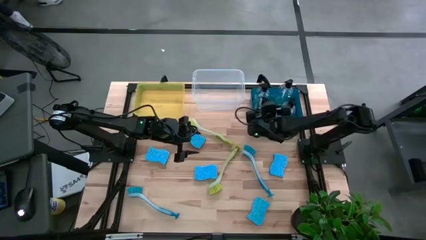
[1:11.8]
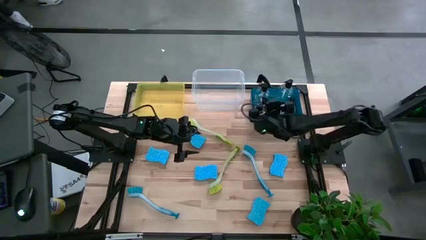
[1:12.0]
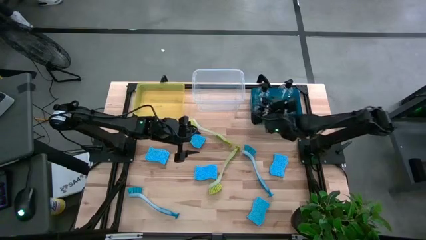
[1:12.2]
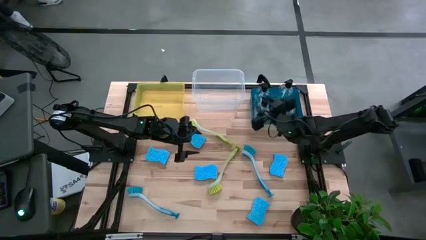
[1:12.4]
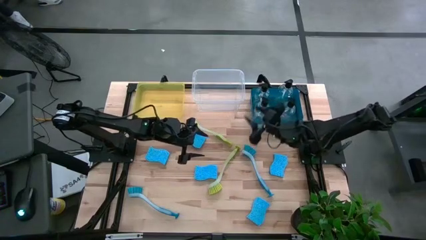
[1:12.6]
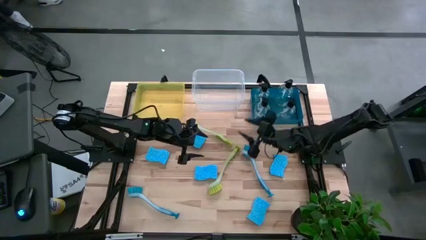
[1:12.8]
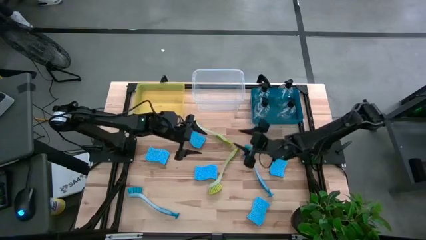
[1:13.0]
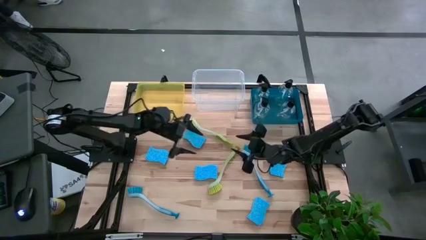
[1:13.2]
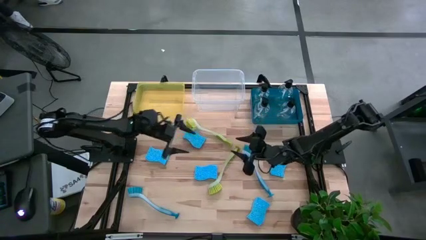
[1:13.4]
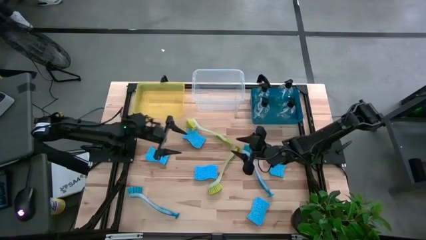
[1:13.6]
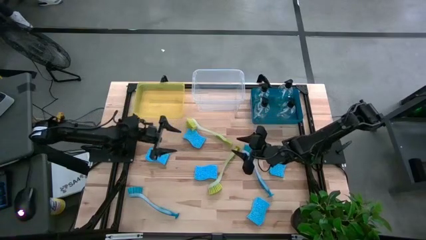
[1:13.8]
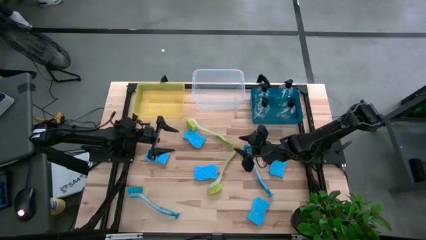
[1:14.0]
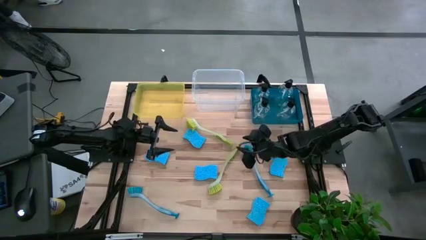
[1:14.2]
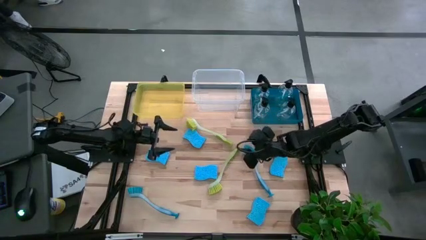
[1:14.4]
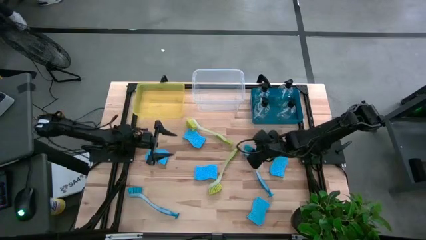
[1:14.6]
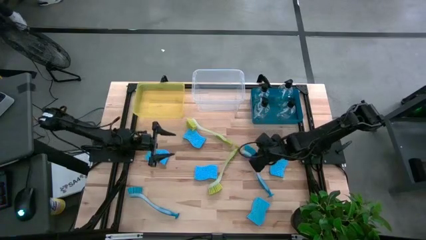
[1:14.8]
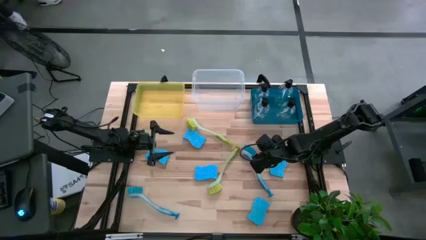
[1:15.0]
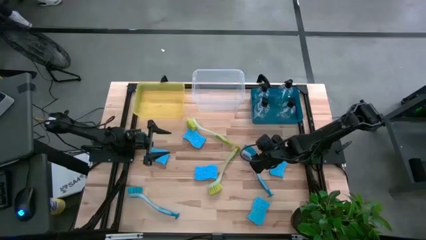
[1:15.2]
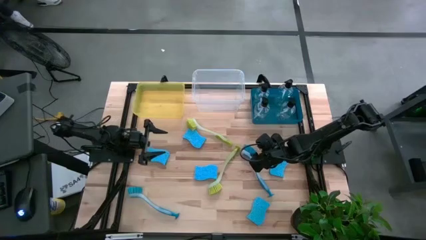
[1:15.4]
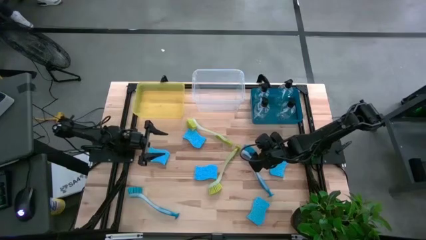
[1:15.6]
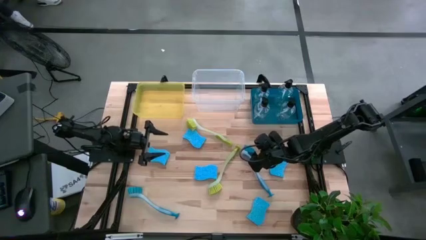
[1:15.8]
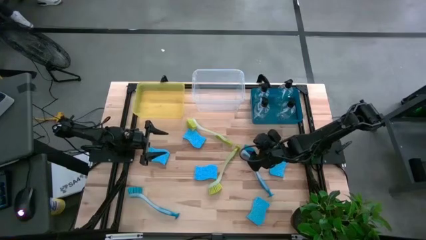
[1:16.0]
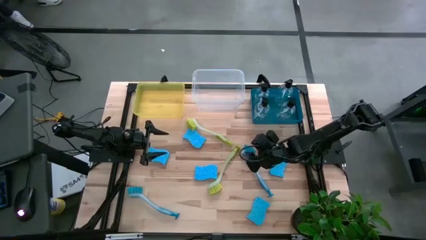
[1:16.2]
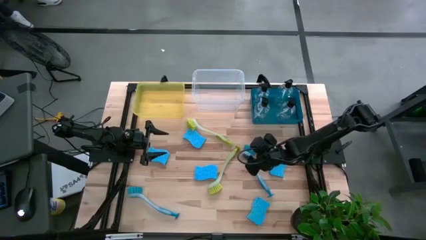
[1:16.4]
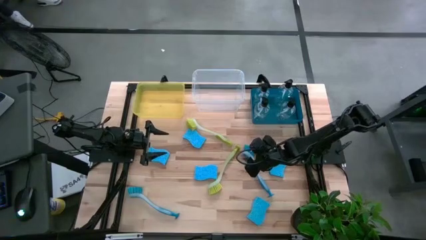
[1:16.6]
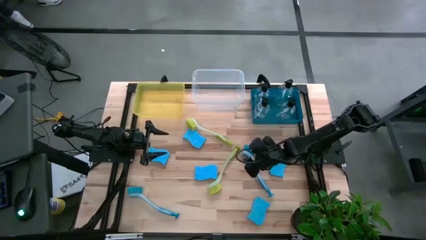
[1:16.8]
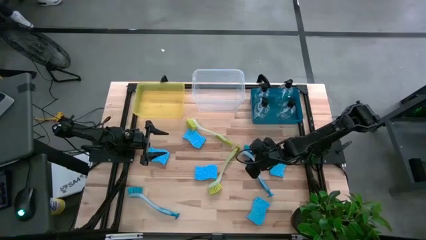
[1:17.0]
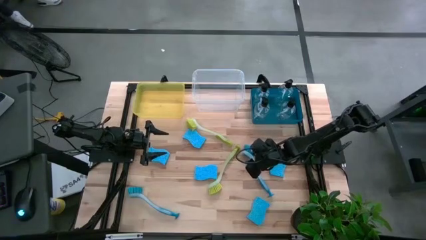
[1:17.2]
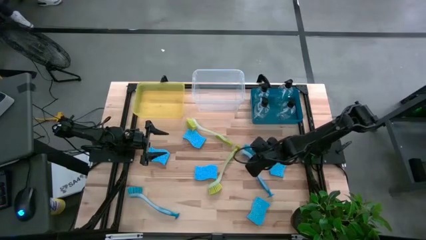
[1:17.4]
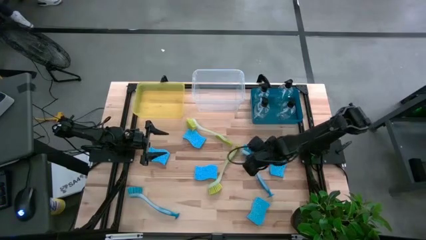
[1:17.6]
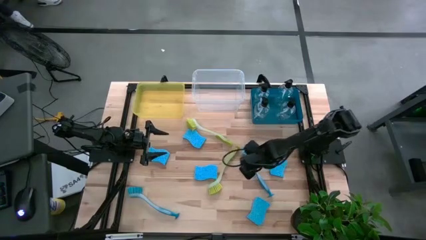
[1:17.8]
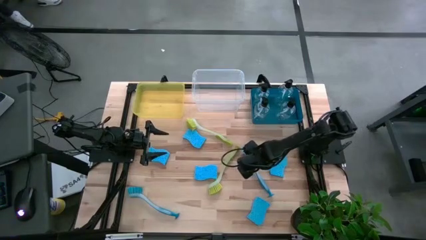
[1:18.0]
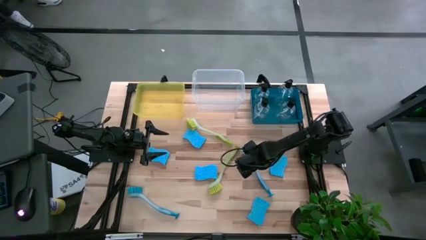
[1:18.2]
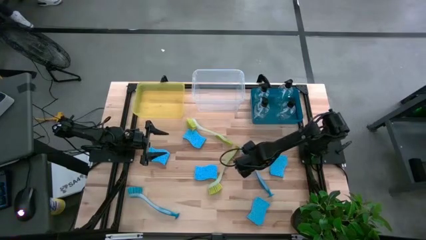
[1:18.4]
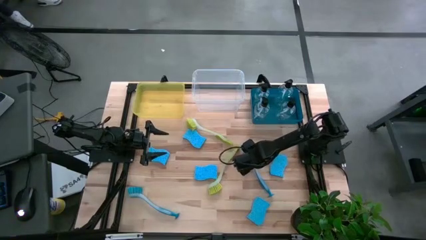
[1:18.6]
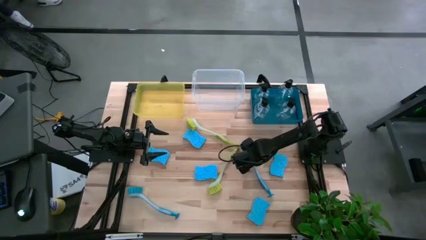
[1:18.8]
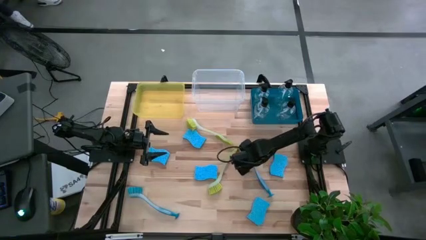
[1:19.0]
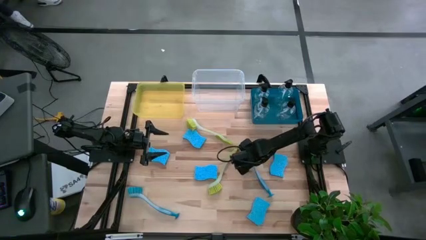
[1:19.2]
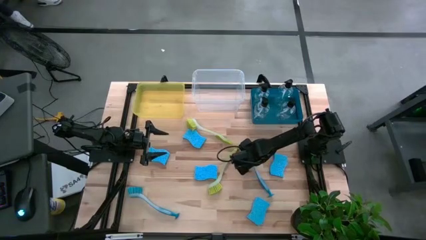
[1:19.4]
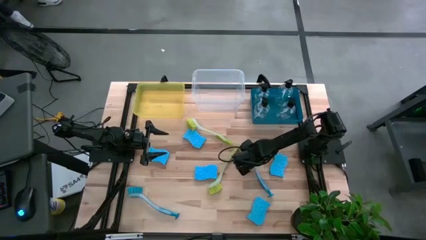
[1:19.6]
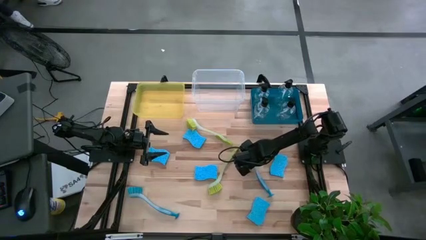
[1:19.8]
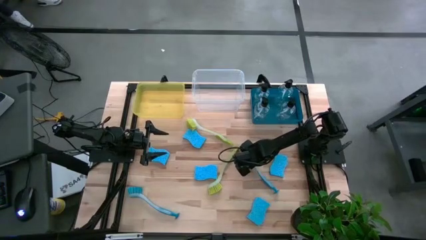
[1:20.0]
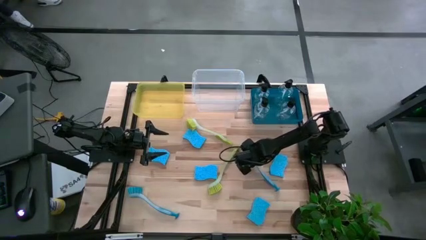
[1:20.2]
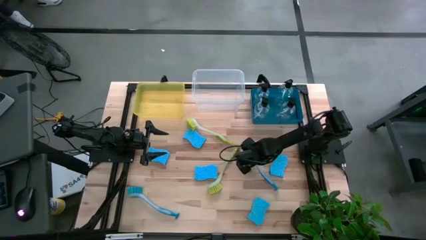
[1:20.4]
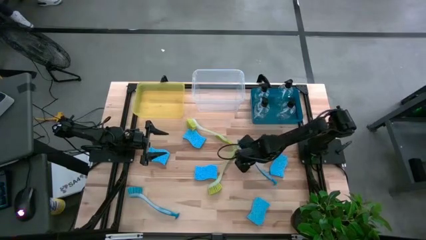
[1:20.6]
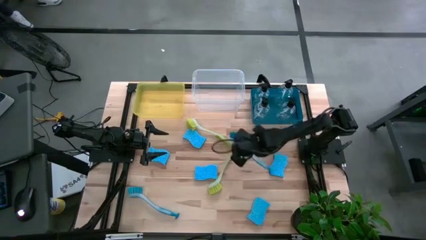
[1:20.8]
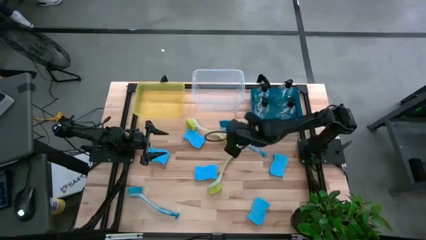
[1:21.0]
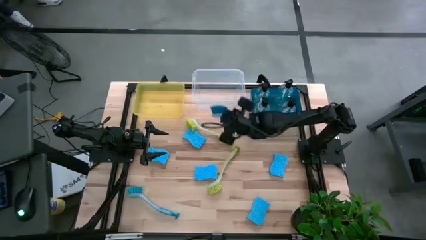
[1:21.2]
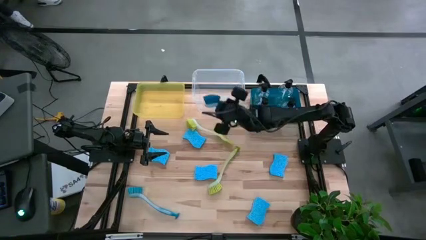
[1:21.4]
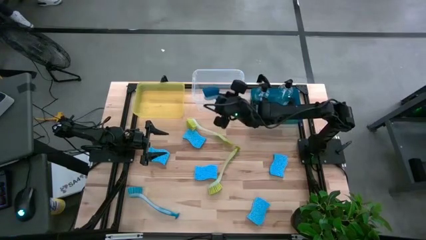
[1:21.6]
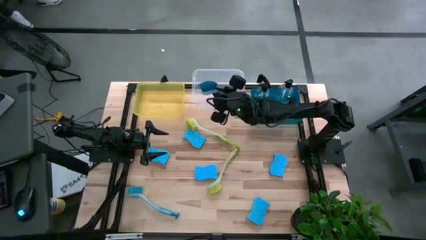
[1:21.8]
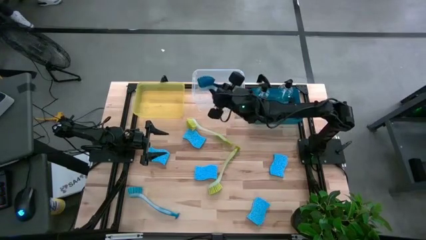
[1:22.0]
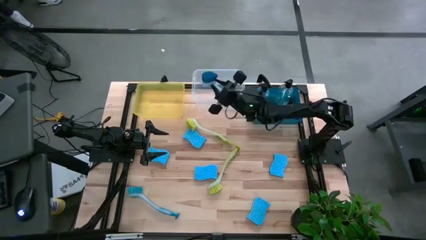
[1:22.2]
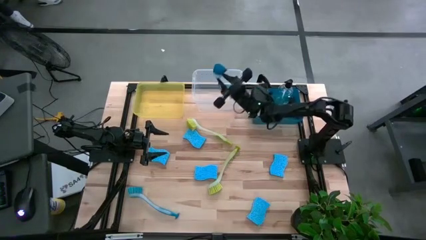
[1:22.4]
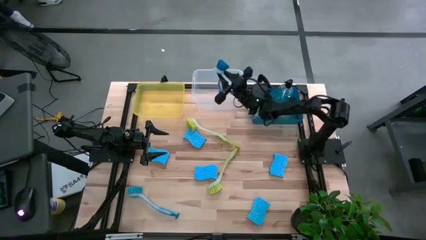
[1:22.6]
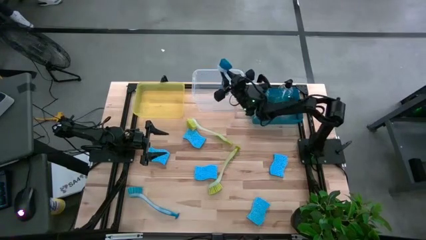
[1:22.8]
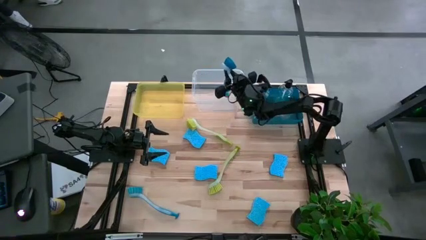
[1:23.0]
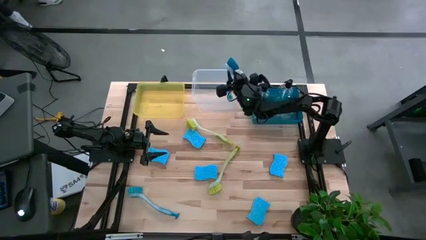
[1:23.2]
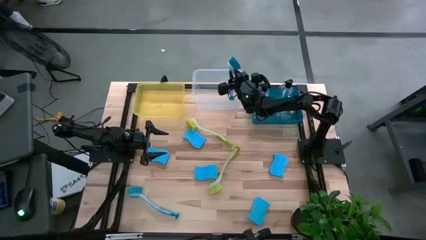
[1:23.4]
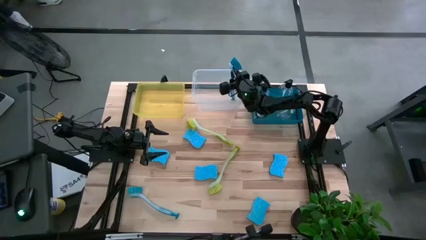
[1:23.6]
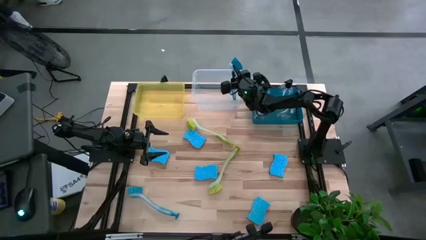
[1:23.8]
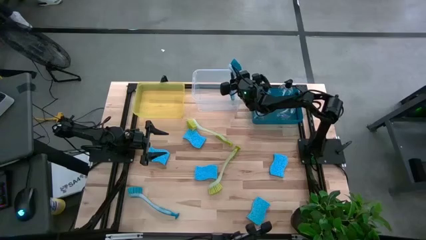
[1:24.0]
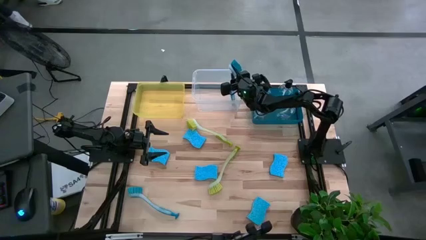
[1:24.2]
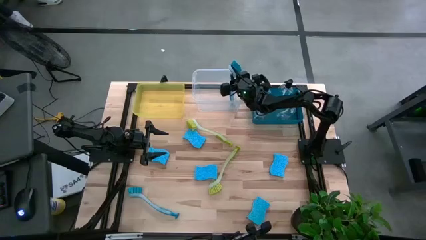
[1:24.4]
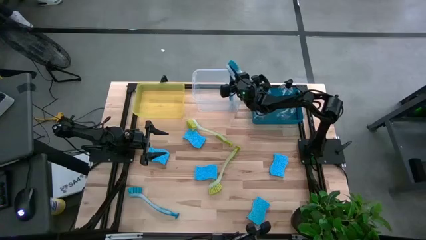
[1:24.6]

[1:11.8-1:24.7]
Task: Pick & Place Kitchen Sink Supplies
Put the blue dish brush into the transparent container

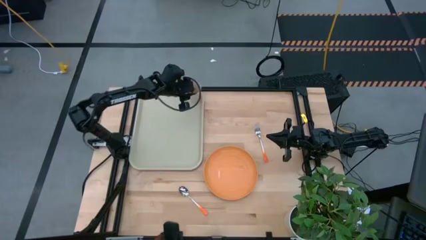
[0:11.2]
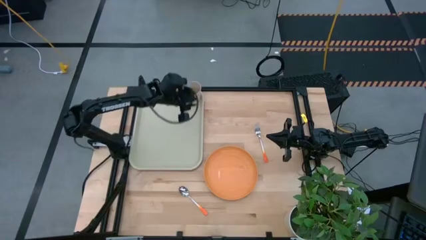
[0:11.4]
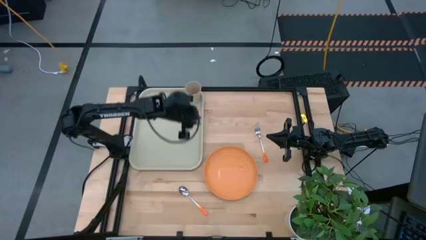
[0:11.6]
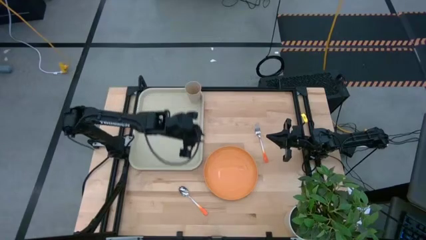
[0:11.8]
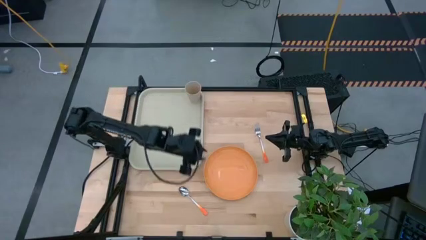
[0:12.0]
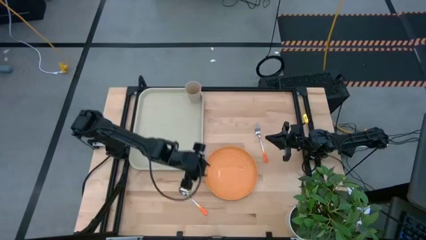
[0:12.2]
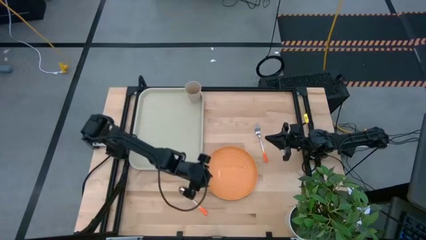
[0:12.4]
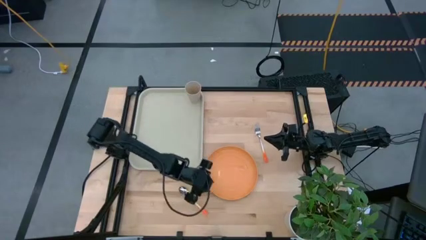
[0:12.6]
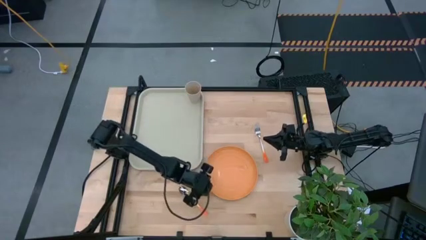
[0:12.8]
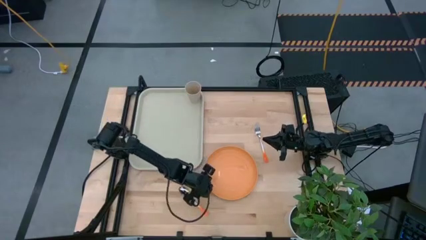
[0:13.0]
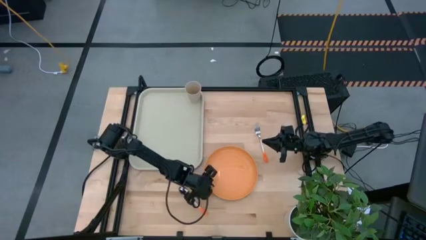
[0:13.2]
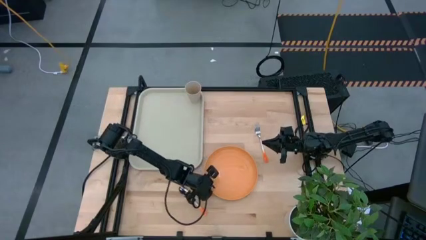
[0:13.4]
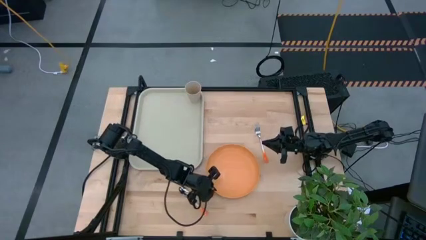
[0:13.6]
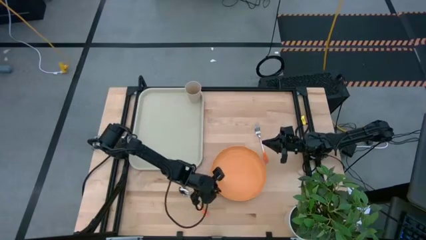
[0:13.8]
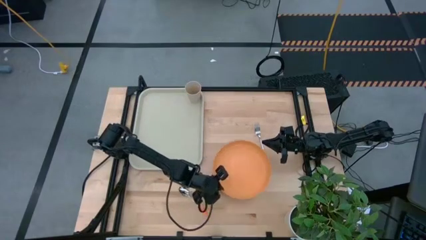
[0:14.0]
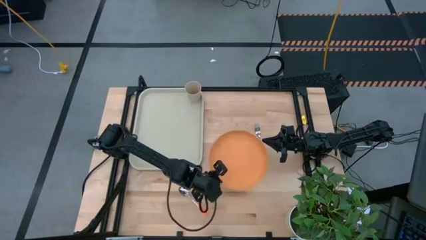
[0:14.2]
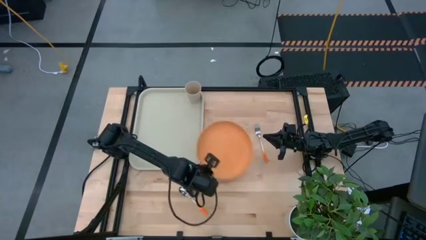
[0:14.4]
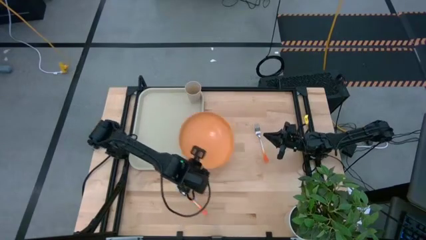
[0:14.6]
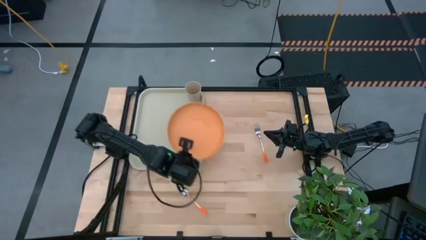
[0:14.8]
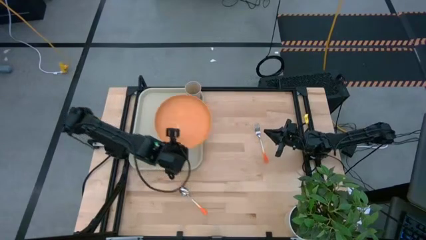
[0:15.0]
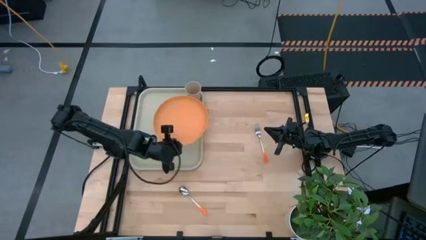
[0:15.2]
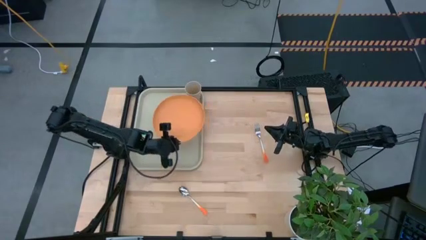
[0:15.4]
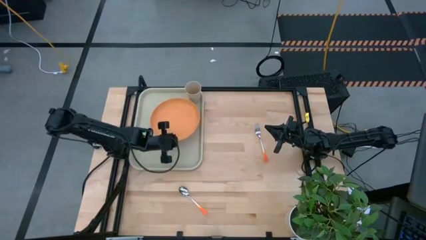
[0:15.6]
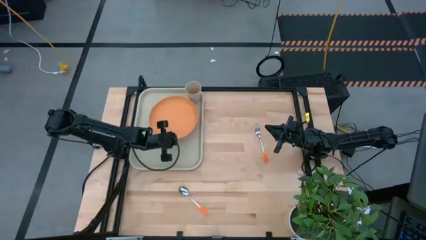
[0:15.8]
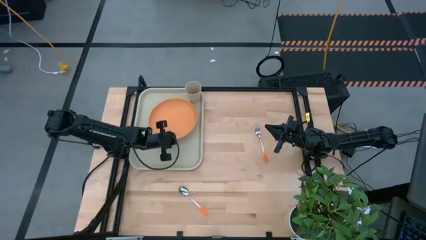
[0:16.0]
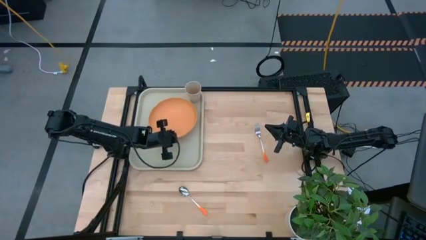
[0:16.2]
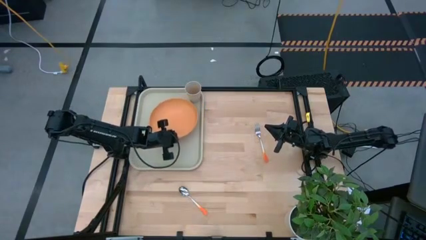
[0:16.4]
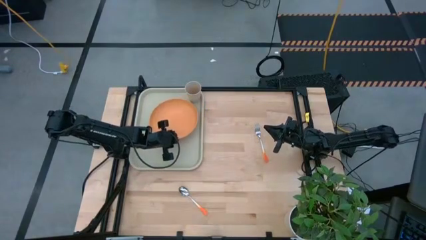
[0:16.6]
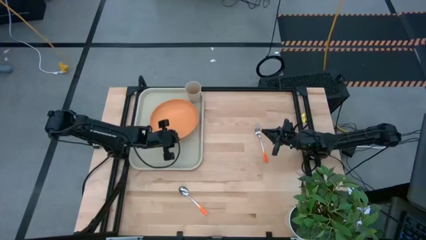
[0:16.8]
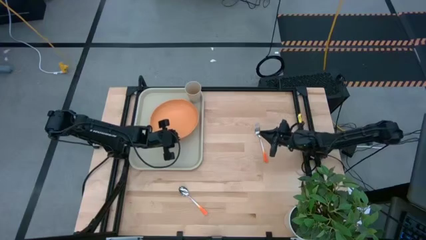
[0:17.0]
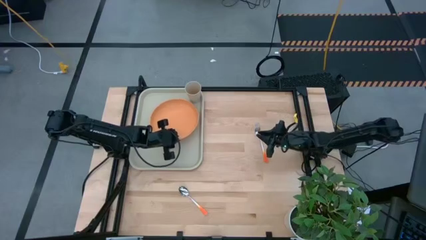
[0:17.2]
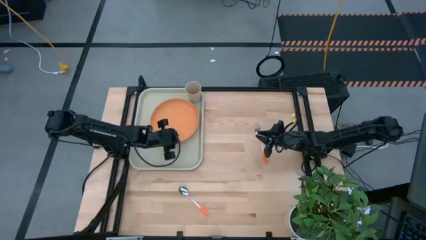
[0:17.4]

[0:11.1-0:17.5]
Task: Pick and place plate/cup/fork/spoon on tray
Put the orange plate on the light brown tray
